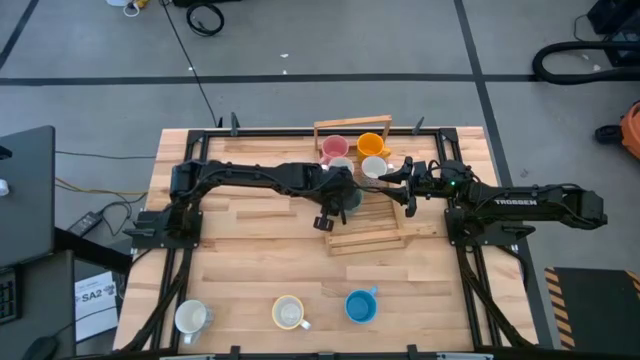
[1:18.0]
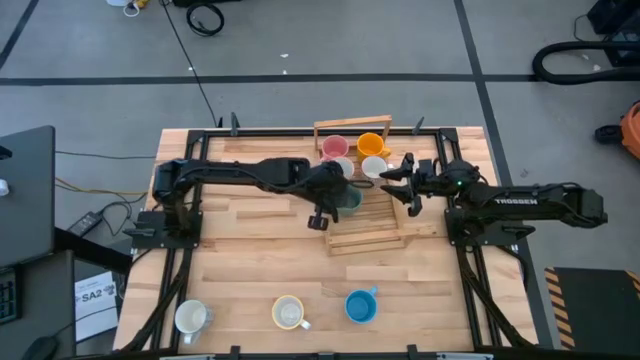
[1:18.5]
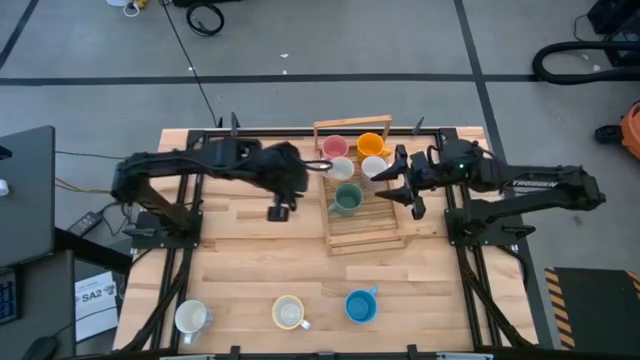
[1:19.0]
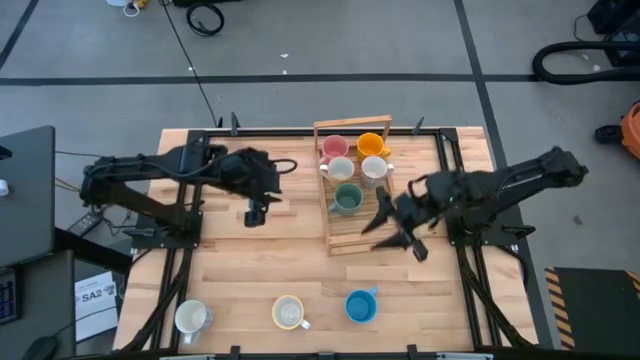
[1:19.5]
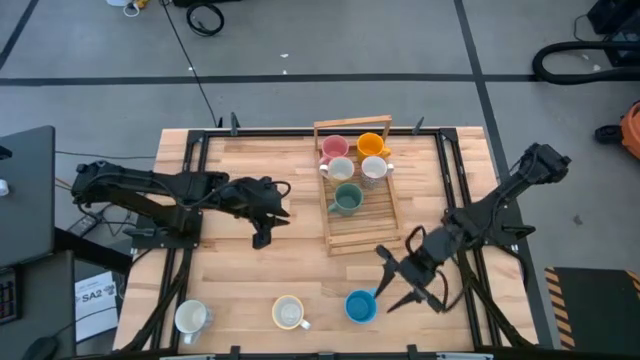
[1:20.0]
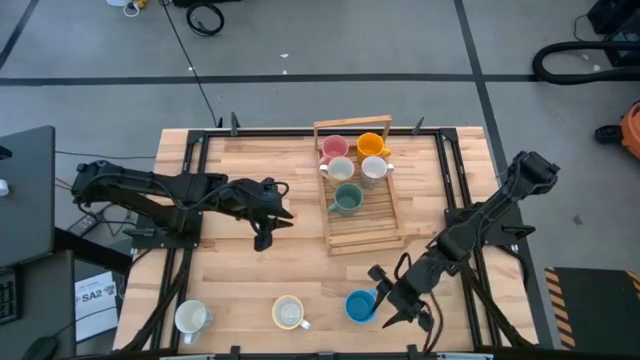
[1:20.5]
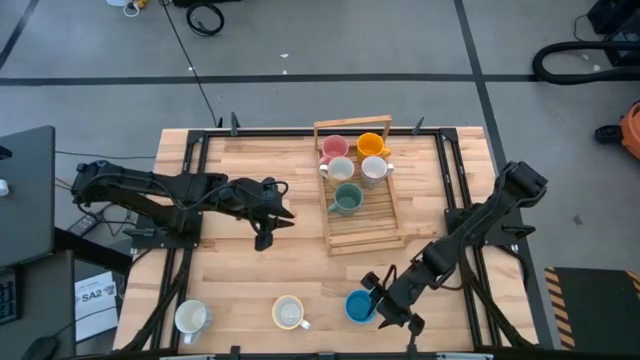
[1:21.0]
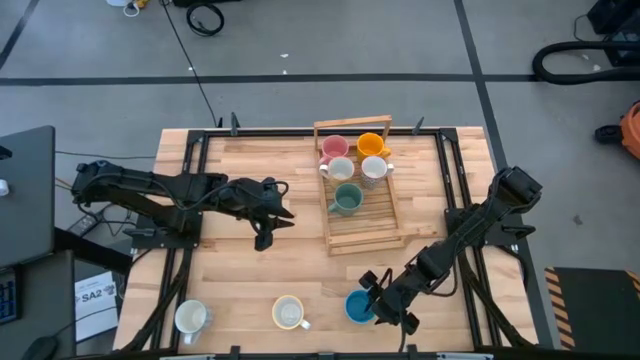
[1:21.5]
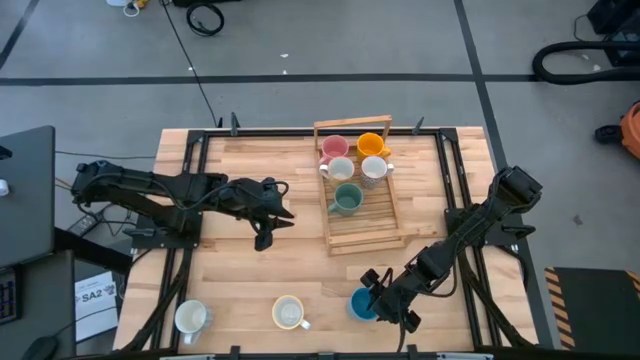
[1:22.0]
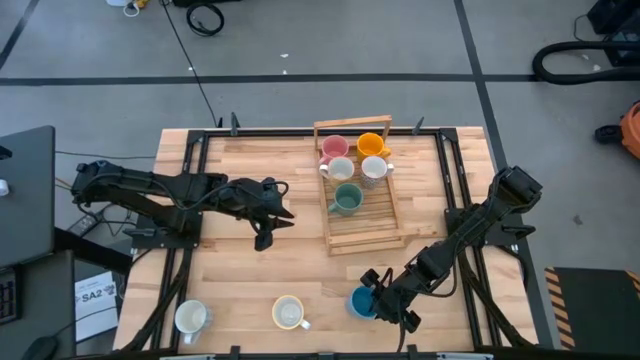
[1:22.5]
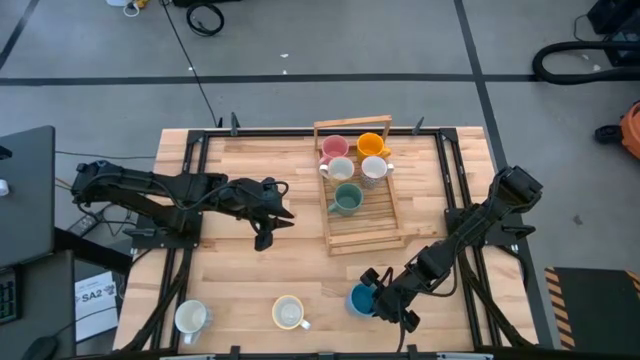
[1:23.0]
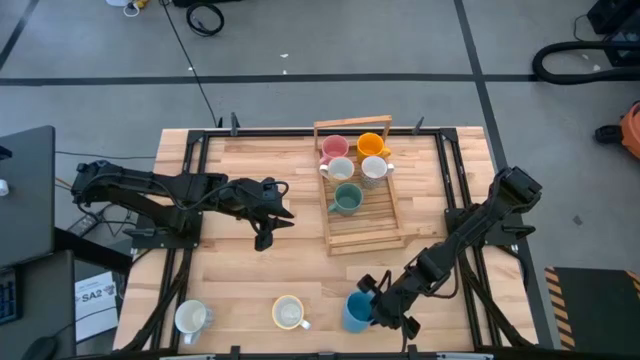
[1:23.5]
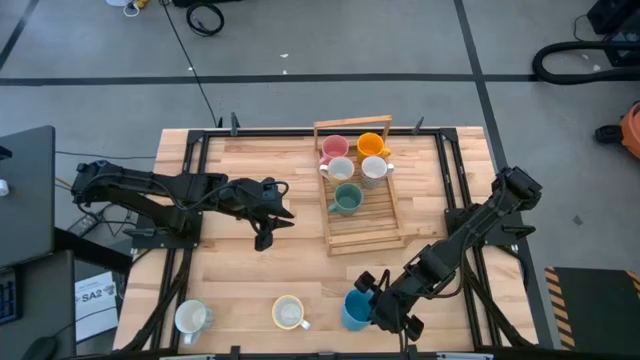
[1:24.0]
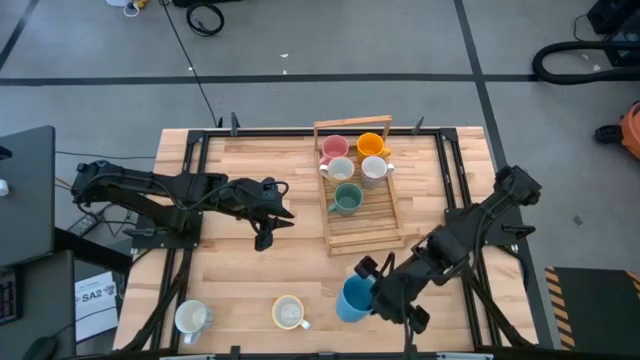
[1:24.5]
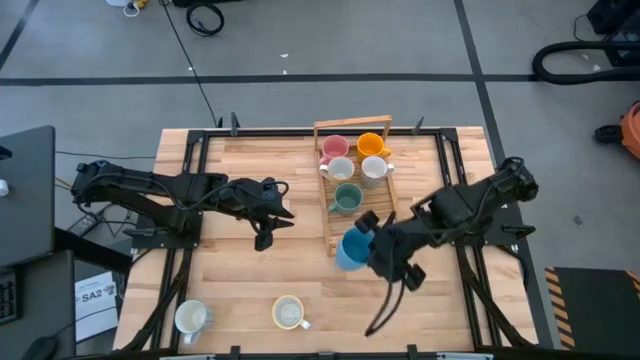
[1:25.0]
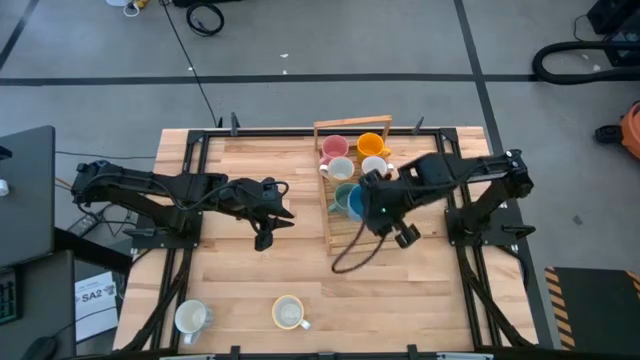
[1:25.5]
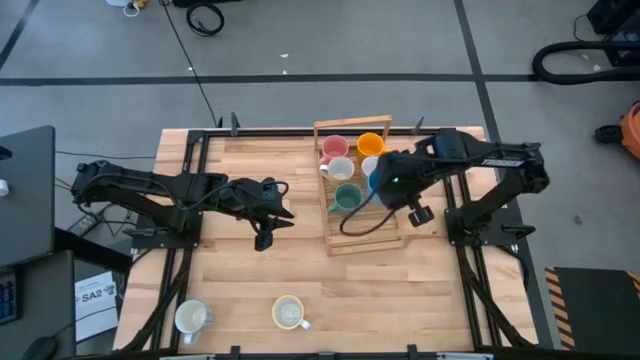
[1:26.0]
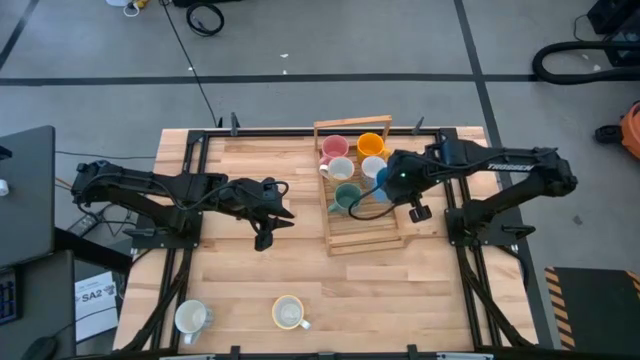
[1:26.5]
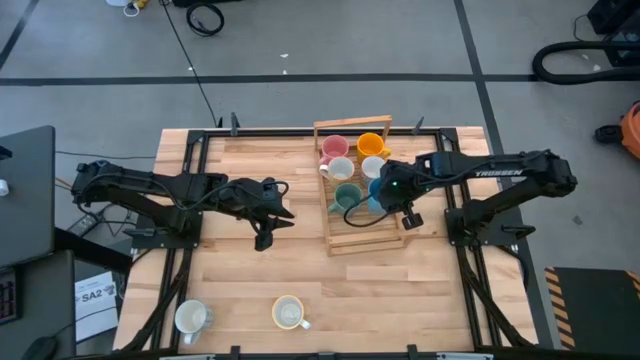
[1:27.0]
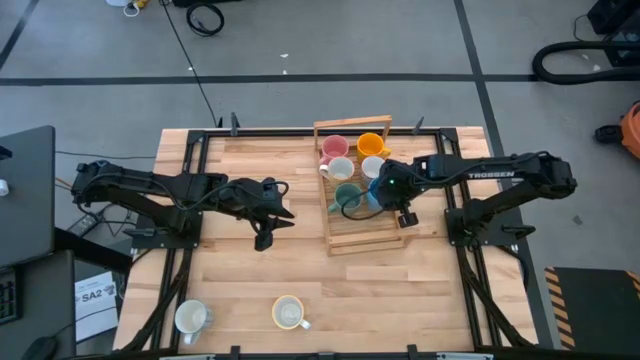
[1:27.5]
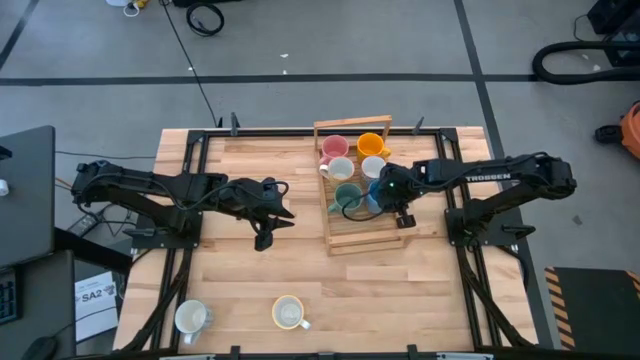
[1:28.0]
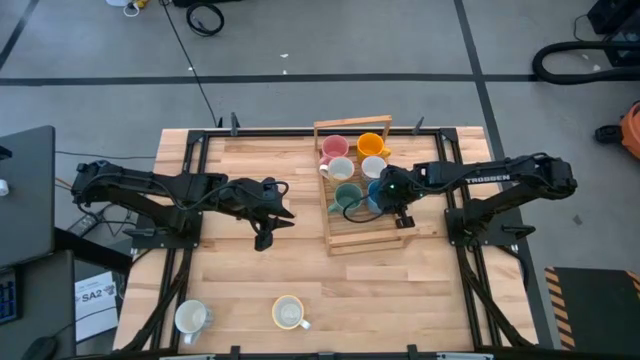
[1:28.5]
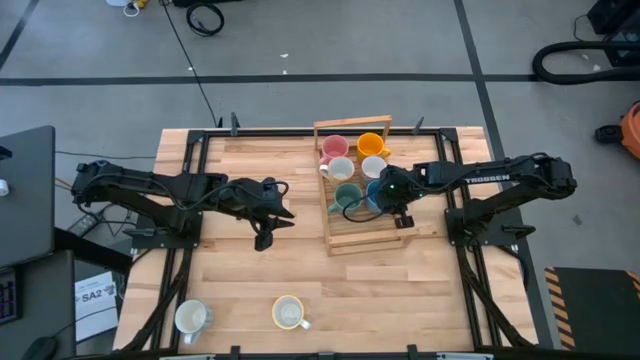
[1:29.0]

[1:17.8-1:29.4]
Task: Place coffee mugs
Put the blue mug on the shelf

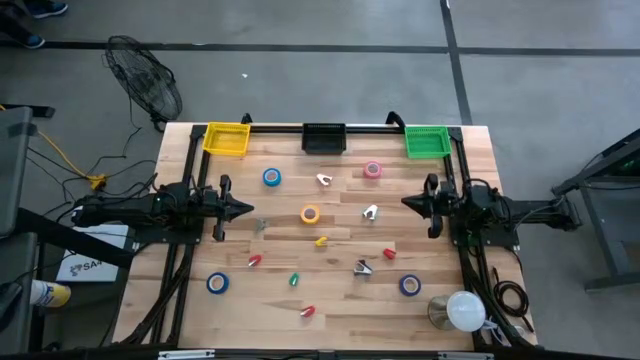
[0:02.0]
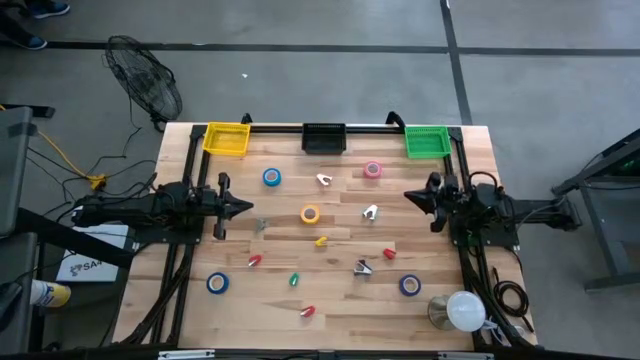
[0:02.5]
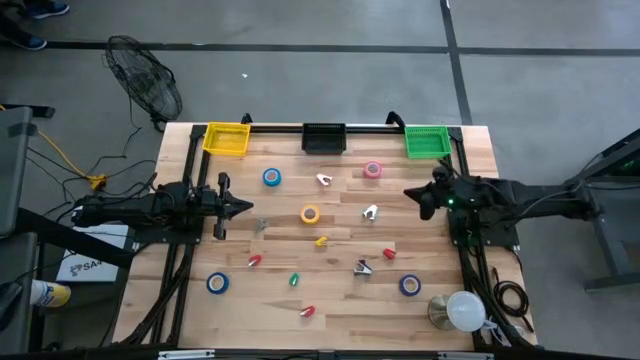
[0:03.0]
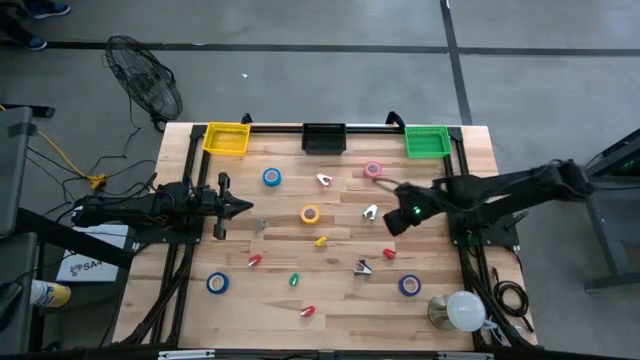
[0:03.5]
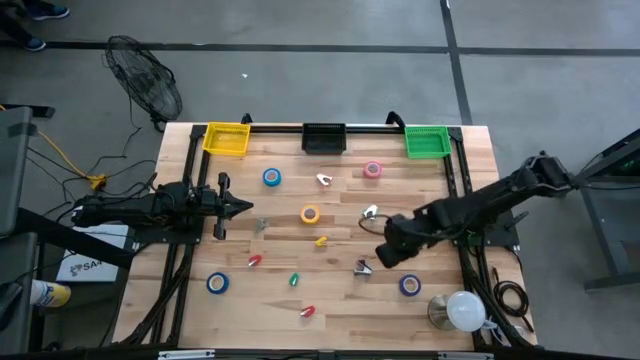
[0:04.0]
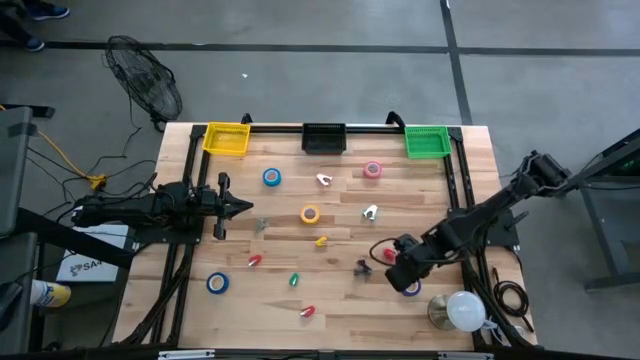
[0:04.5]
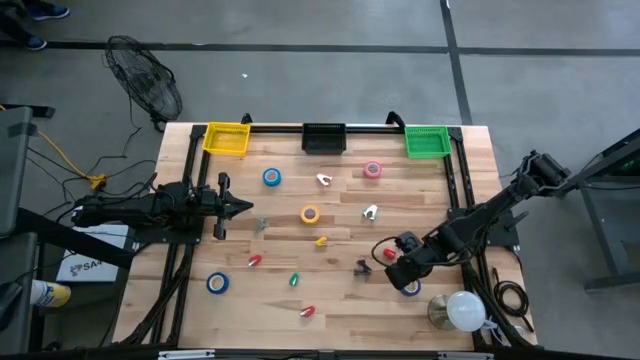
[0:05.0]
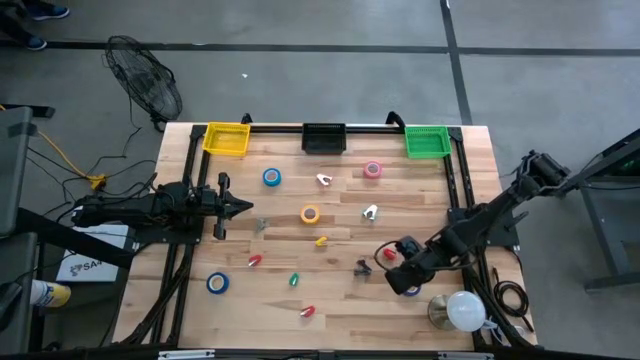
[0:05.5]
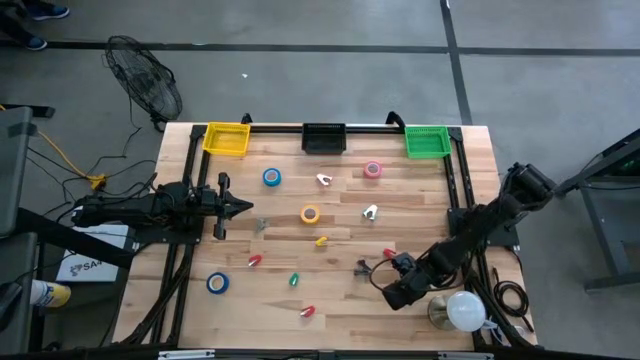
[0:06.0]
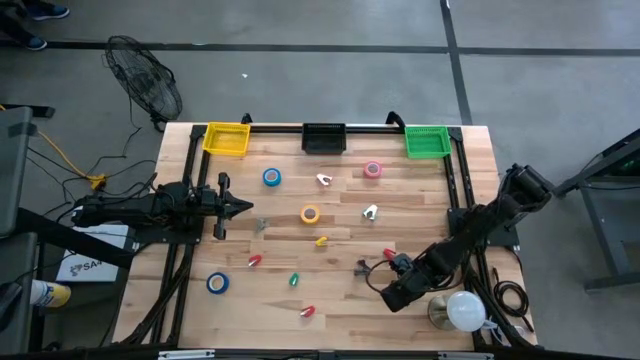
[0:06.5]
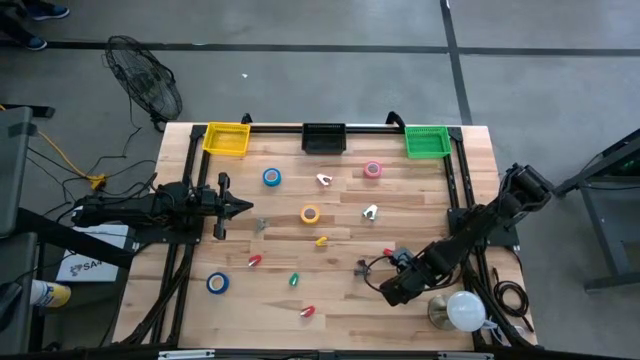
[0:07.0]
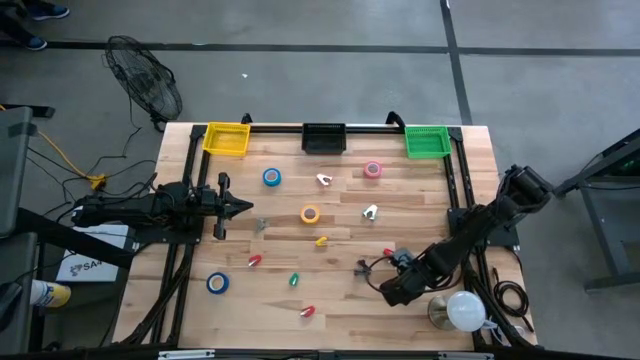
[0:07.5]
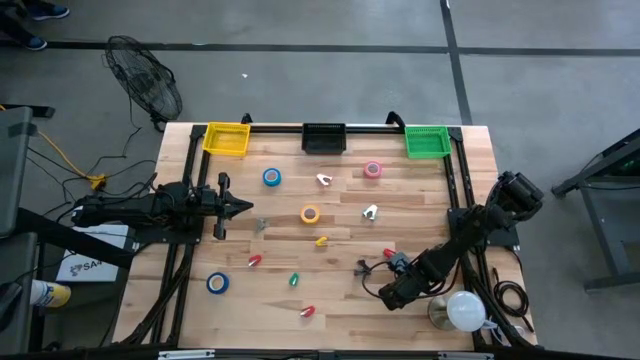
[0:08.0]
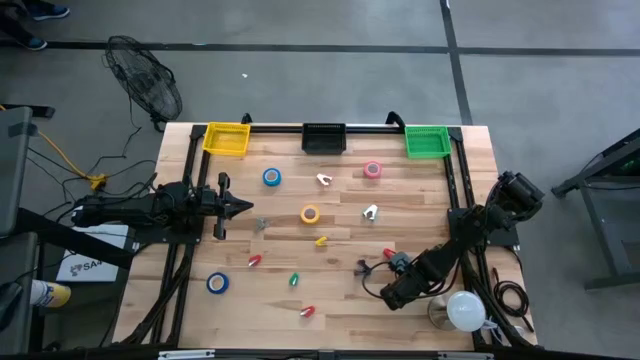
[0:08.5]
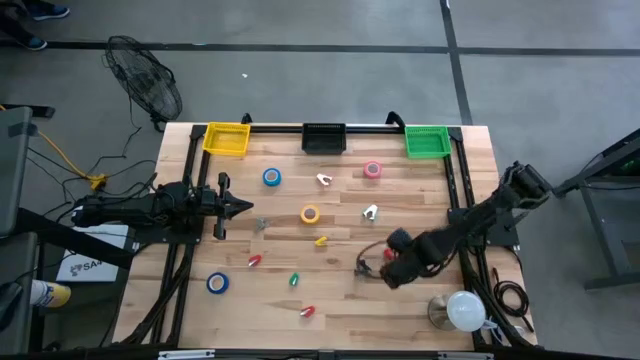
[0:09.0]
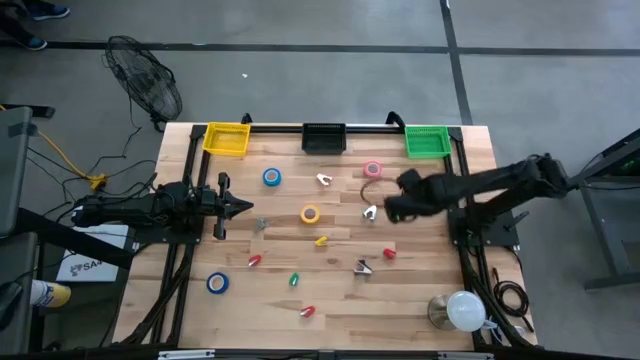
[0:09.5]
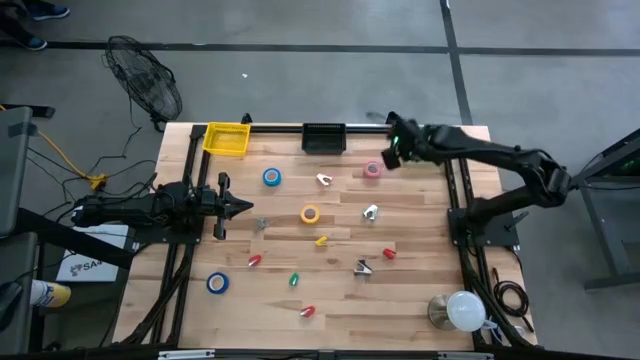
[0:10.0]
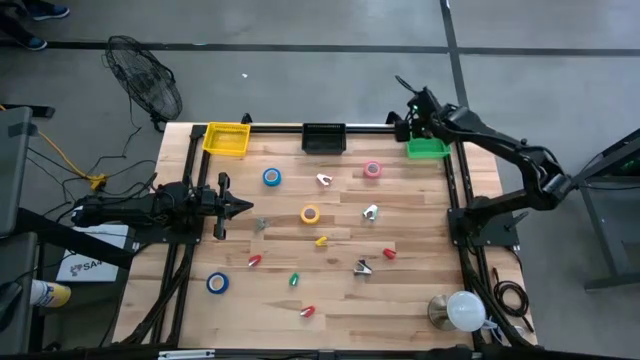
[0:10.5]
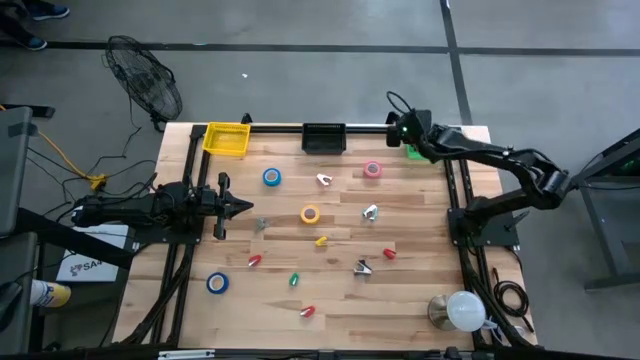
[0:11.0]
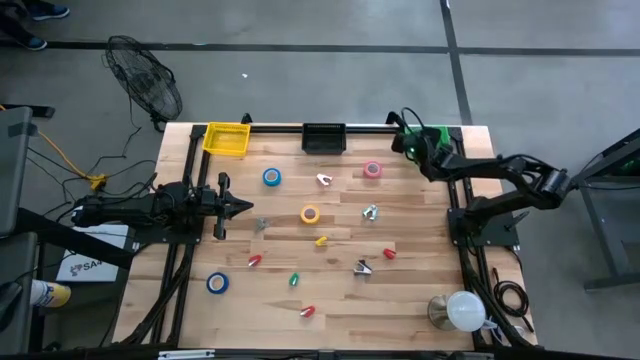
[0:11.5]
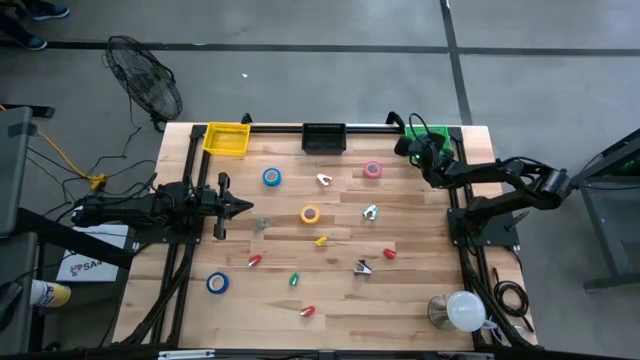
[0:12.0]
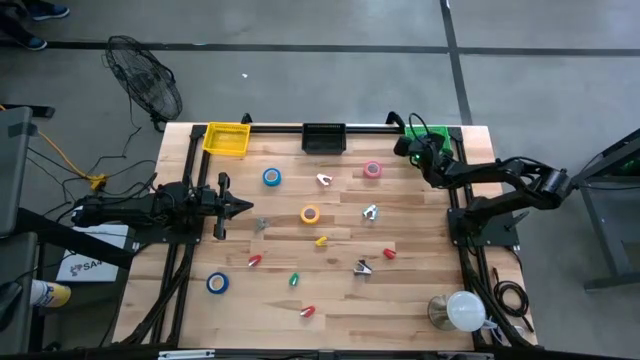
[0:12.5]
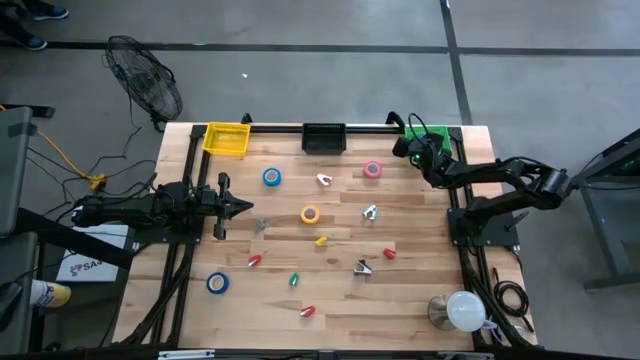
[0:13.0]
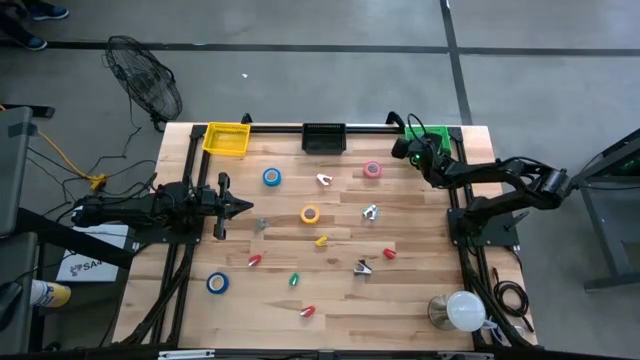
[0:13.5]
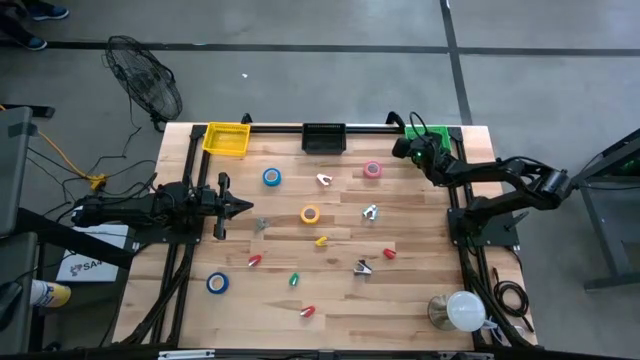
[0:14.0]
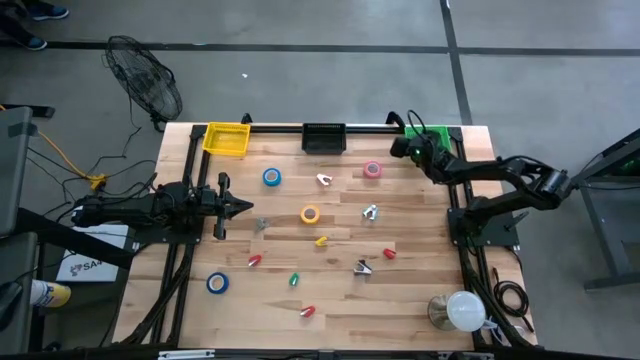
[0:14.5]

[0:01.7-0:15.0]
Task: Pick and place Stapler, Stapler remover, tape
Put the dark blue tape into the green bin
